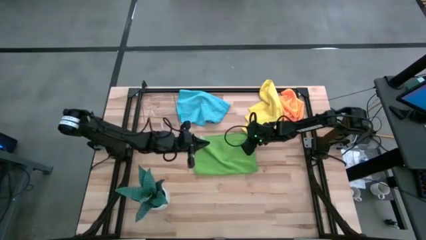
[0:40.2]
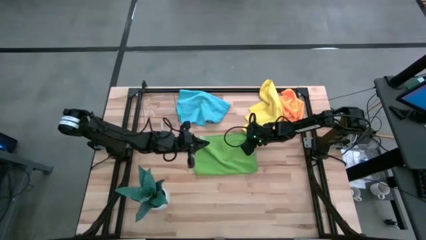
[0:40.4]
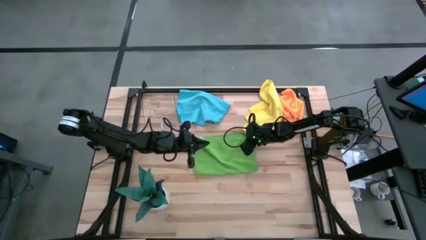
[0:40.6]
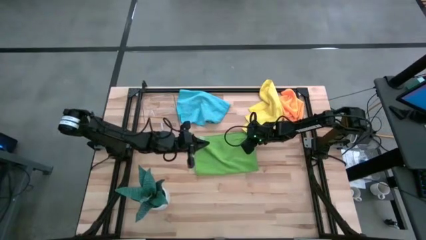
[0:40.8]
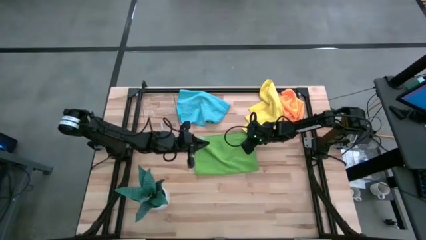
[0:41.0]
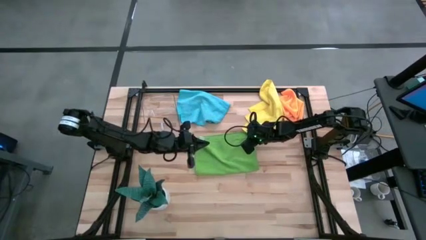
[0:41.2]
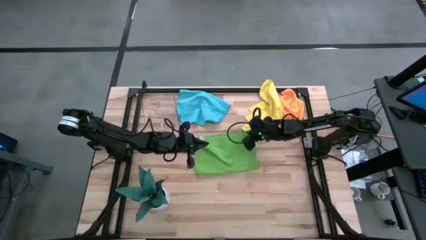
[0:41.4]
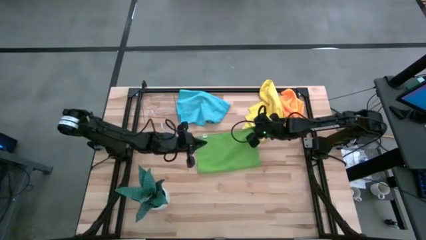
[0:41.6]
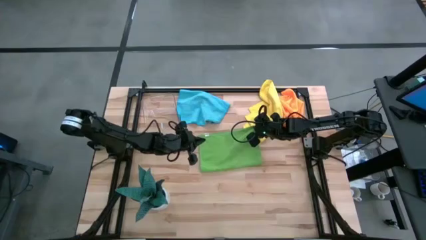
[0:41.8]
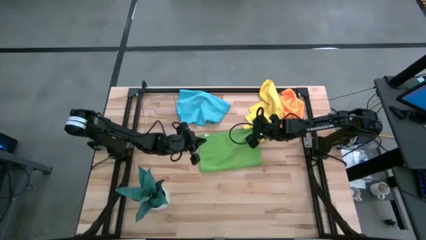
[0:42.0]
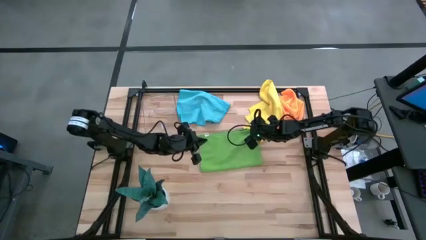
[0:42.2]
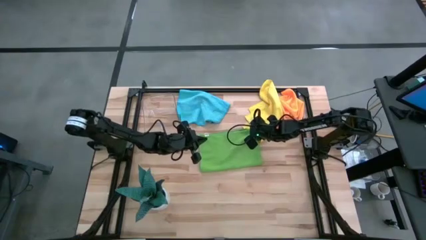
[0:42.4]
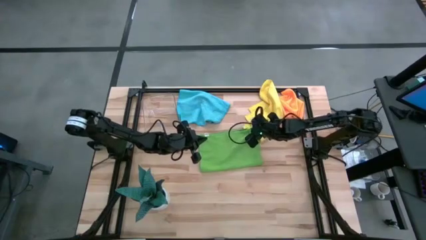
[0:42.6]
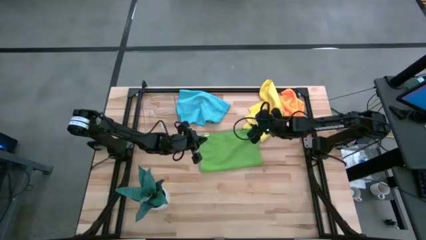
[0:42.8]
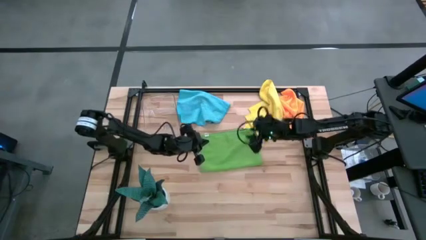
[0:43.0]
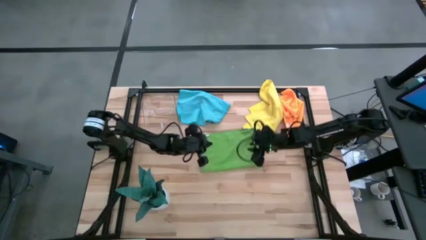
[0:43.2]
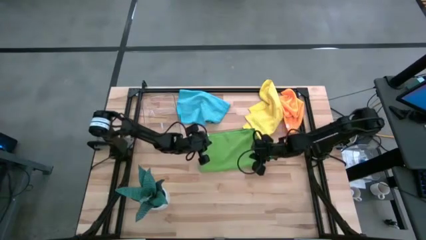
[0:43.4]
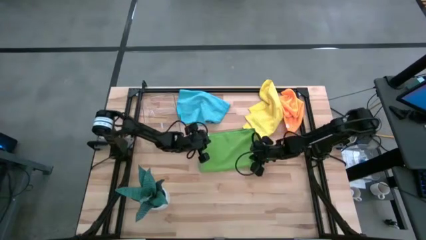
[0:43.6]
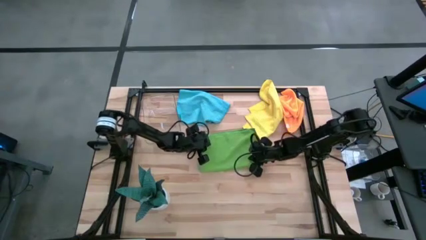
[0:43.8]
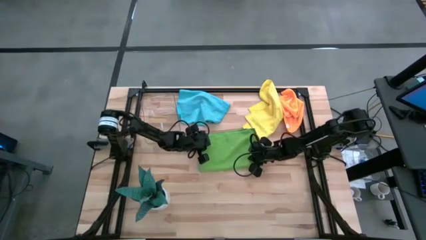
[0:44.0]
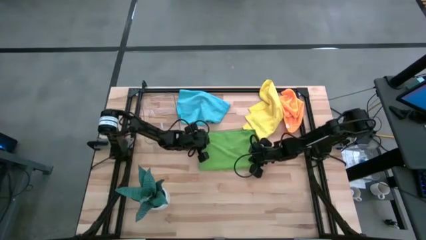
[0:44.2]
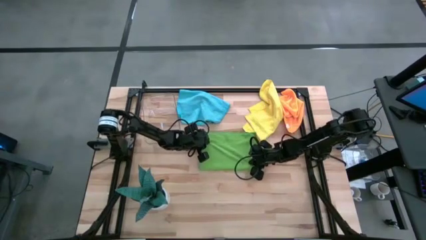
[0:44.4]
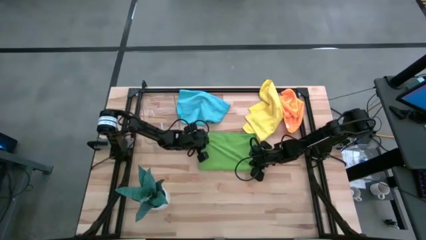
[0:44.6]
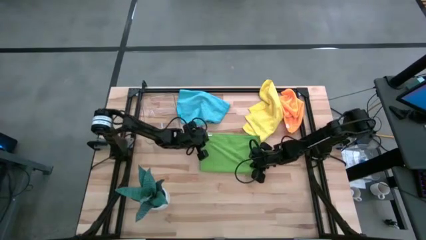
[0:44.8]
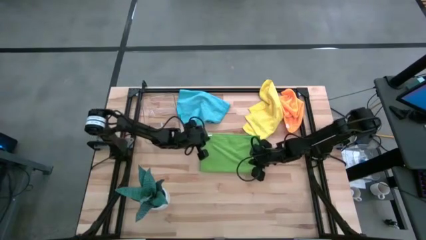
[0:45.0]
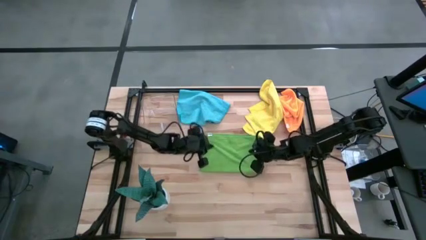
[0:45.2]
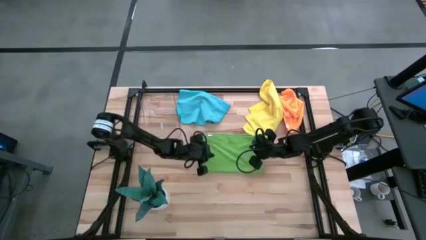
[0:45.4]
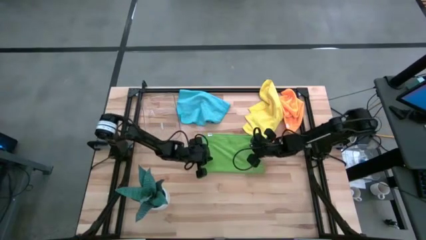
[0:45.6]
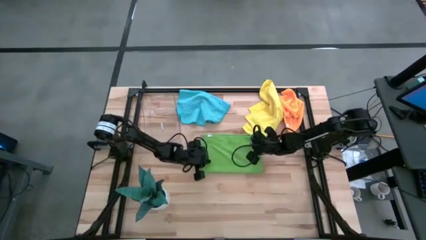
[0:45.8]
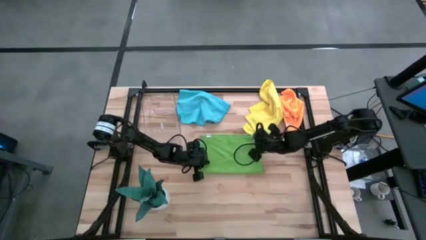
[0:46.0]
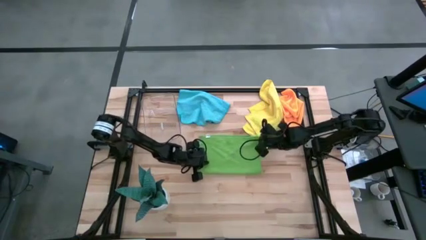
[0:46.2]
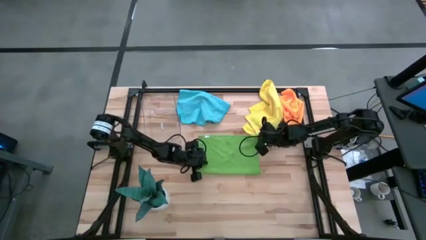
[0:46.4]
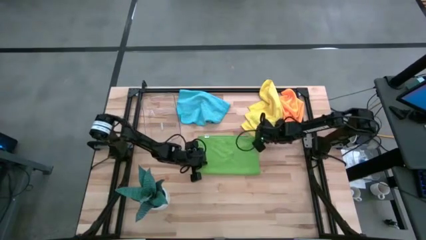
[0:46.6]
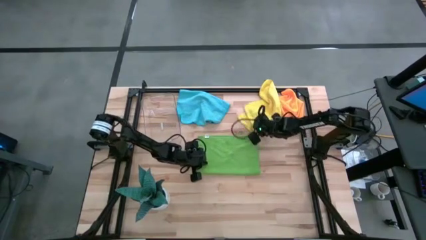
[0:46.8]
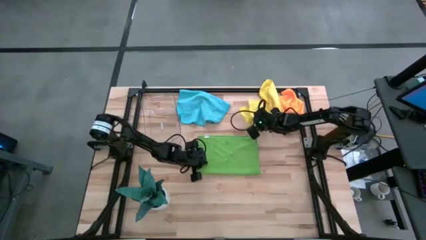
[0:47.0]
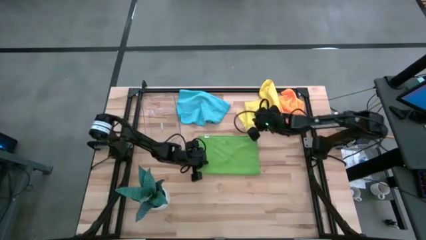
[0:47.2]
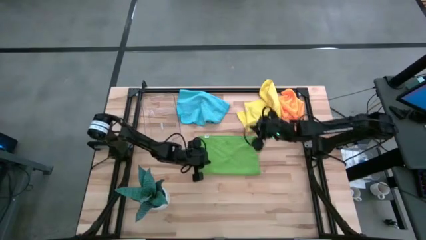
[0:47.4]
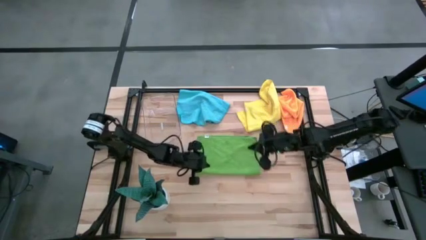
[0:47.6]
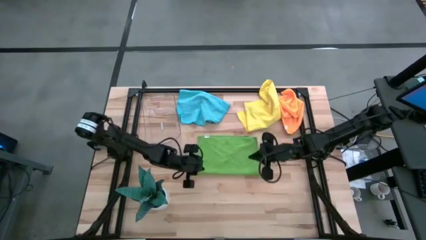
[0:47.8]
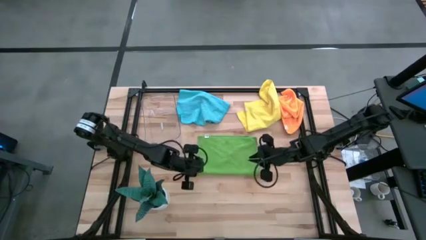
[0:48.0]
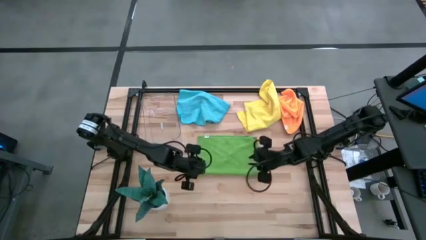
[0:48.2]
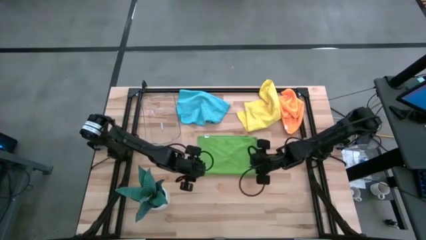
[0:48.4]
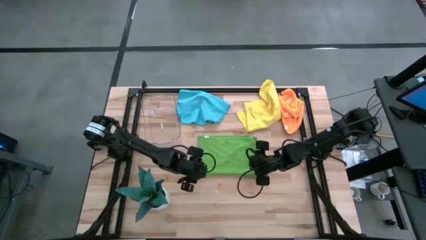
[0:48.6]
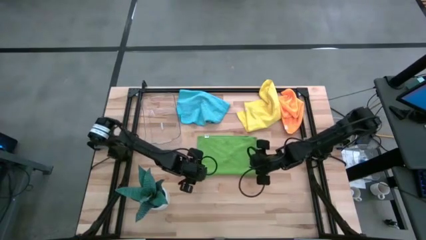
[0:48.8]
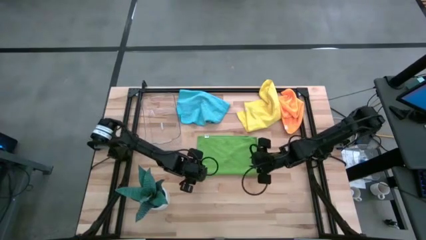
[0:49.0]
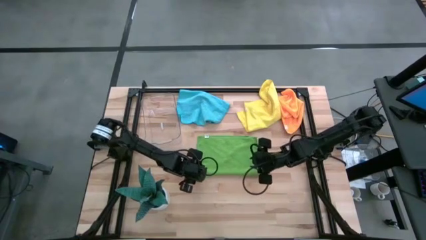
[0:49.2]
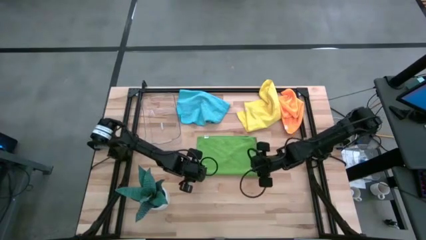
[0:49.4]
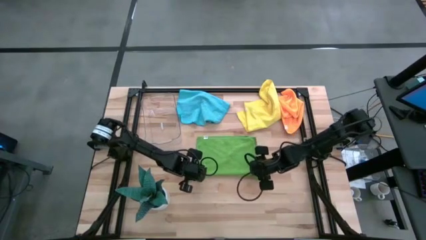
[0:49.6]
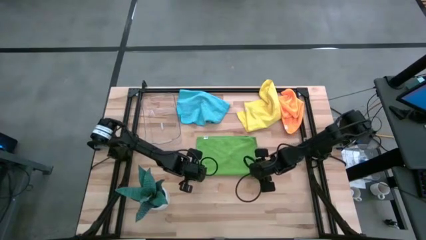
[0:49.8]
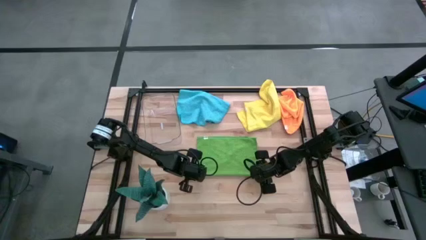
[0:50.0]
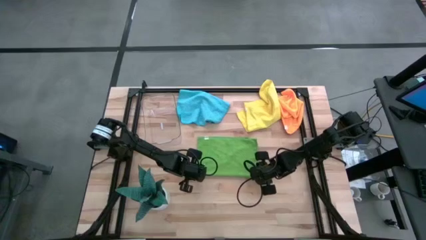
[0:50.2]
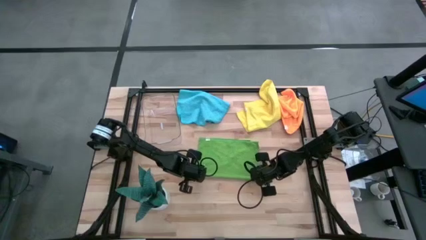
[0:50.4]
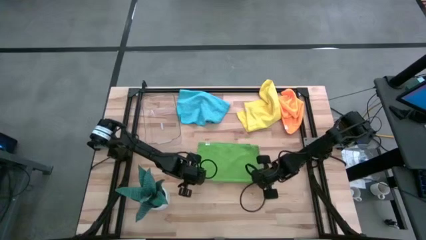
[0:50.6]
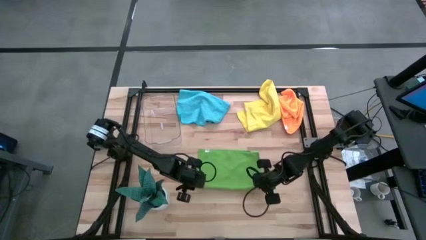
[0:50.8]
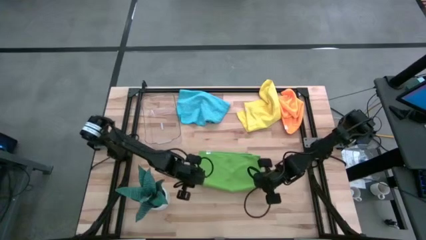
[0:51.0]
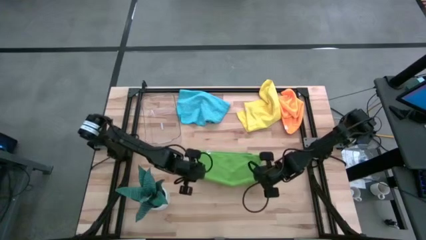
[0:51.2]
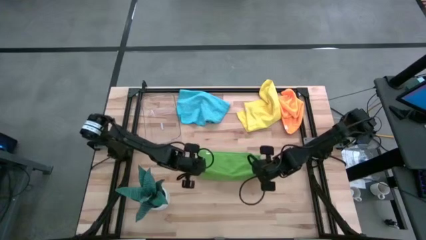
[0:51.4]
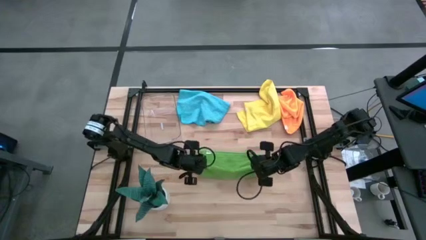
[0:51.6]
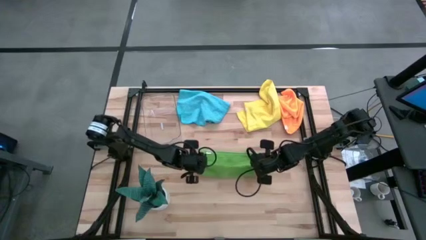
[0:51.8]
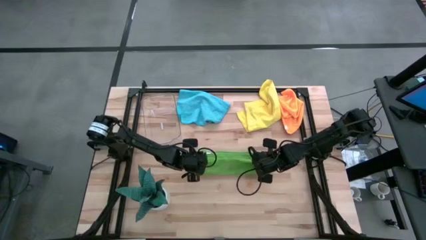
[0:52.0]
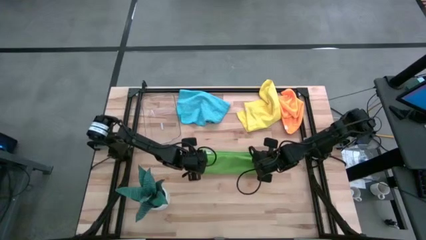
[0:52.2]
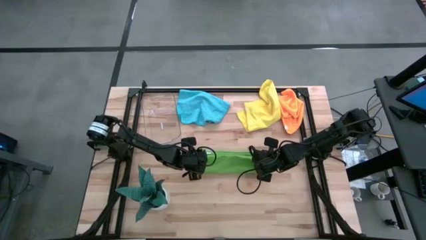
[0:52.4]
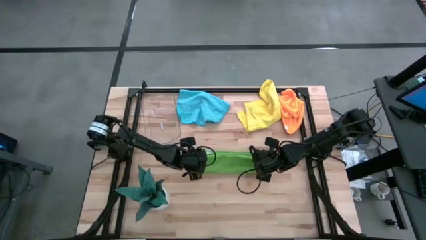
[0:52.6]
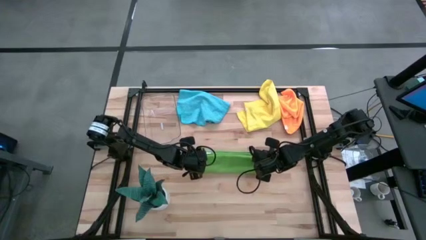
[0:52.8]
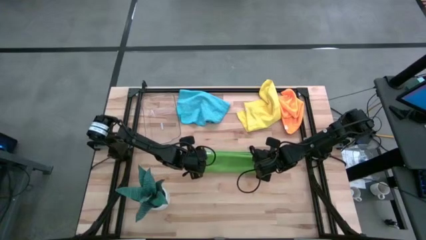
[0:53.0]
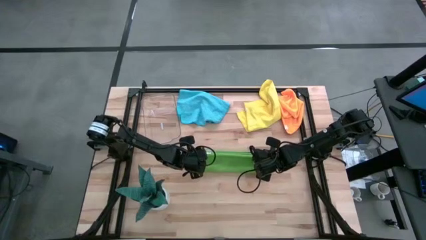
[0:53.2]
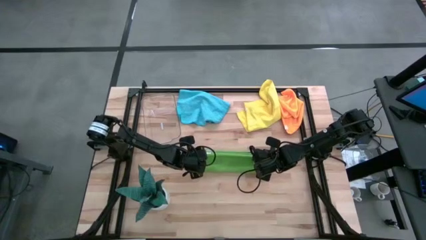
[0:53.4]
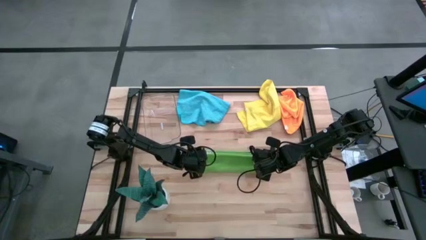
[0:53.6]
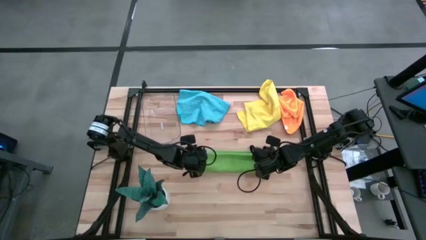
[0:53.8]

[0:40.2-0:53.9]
Task: Roll microfiber towels into tight, uniform cylinder then place into a basket
Fold the green microfiber towel
